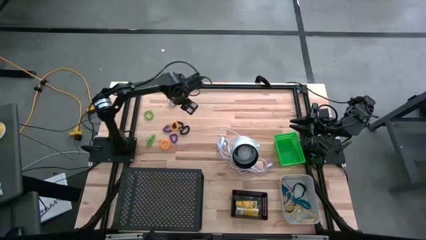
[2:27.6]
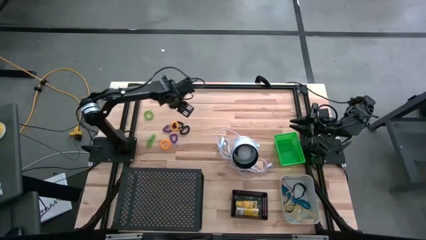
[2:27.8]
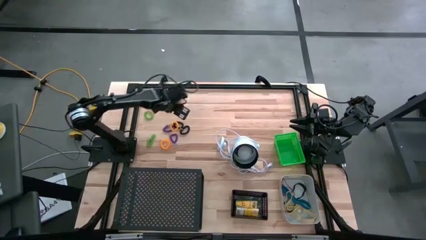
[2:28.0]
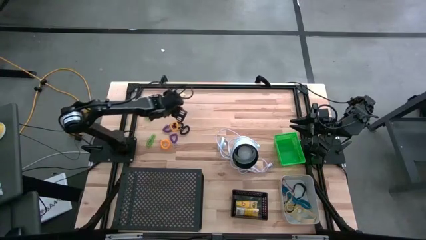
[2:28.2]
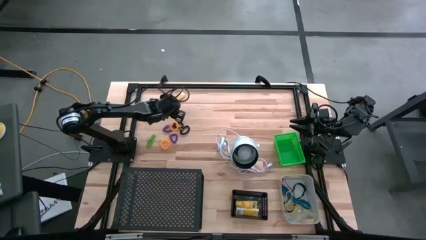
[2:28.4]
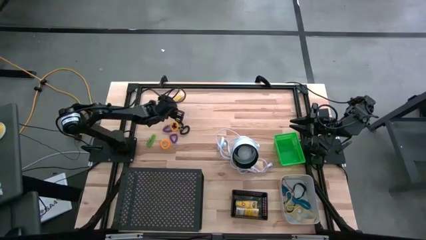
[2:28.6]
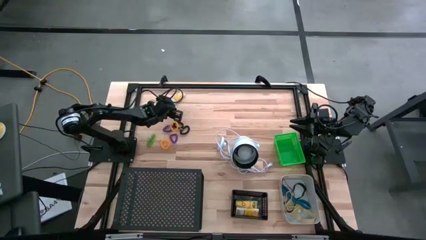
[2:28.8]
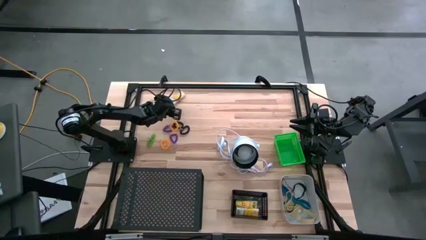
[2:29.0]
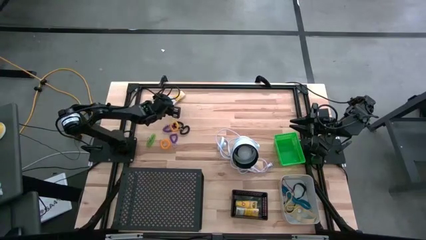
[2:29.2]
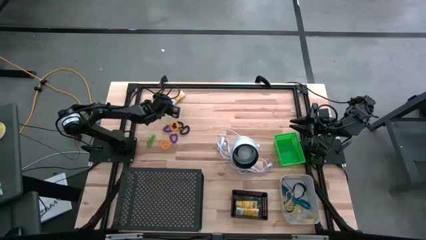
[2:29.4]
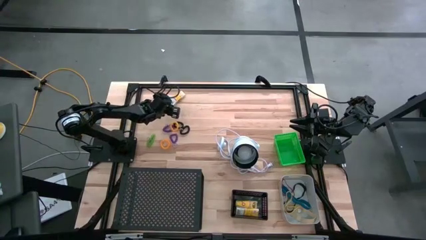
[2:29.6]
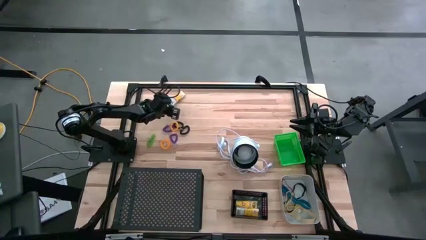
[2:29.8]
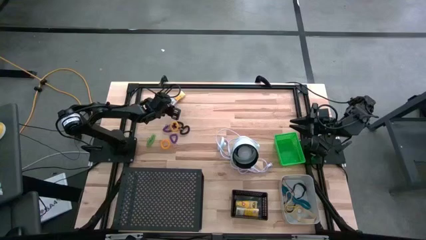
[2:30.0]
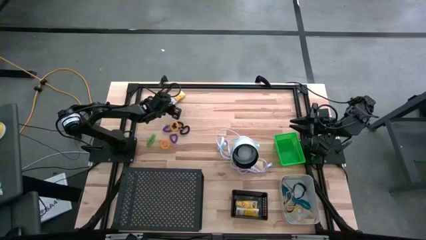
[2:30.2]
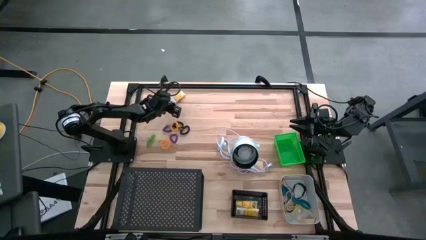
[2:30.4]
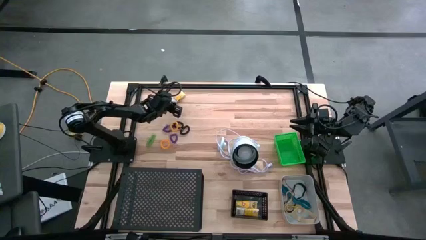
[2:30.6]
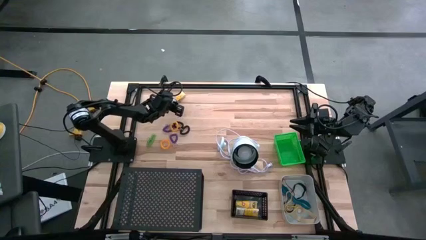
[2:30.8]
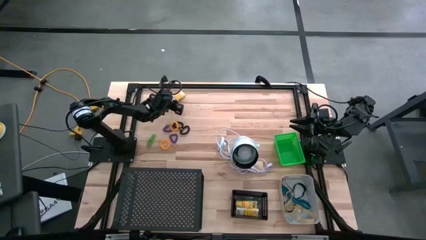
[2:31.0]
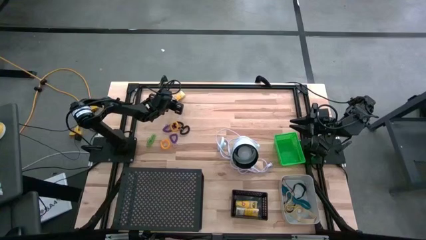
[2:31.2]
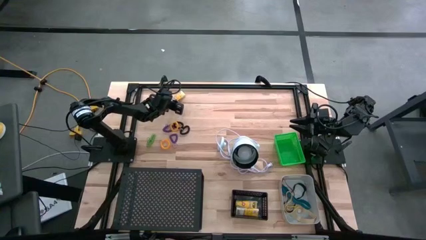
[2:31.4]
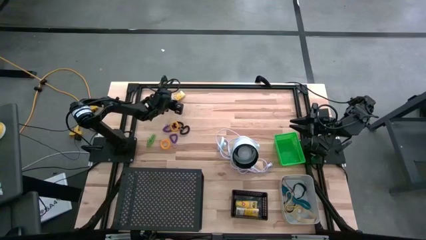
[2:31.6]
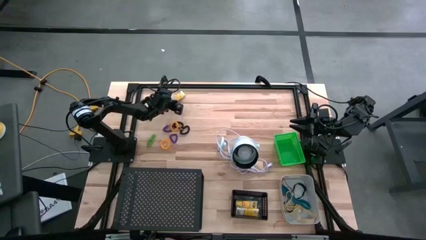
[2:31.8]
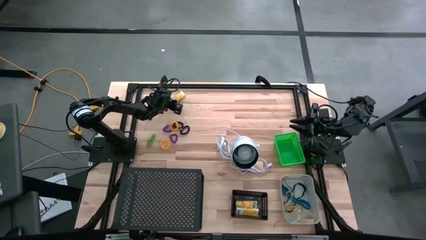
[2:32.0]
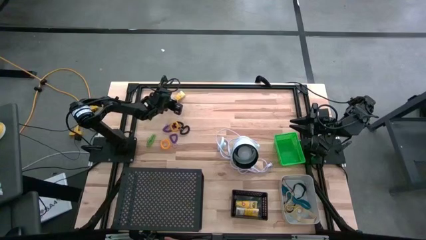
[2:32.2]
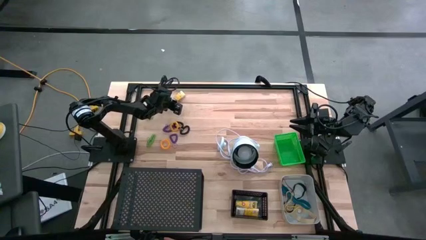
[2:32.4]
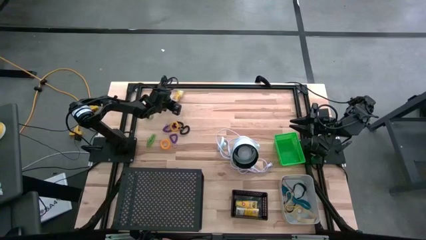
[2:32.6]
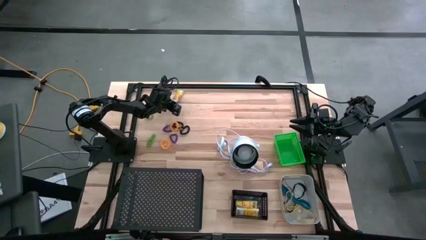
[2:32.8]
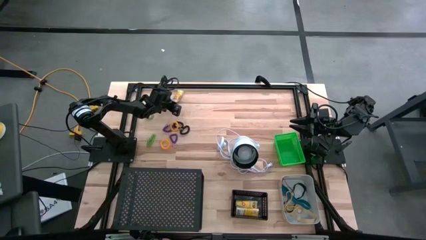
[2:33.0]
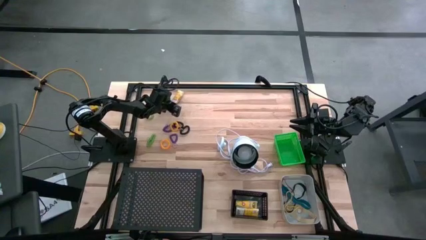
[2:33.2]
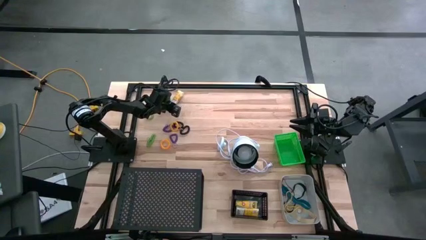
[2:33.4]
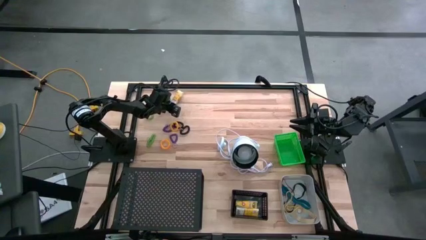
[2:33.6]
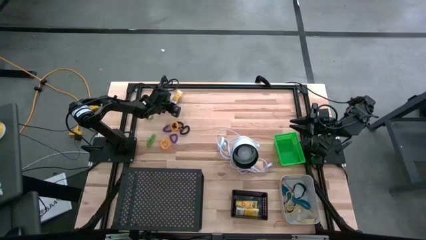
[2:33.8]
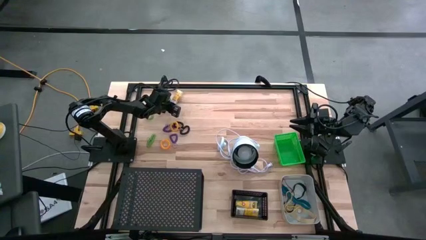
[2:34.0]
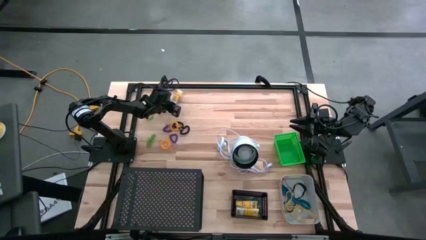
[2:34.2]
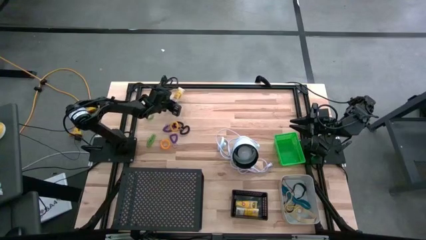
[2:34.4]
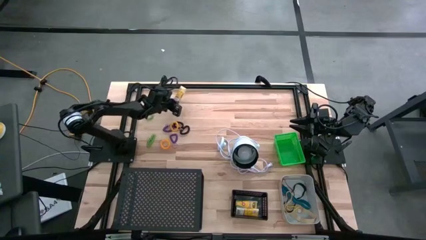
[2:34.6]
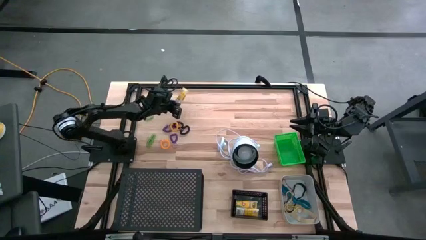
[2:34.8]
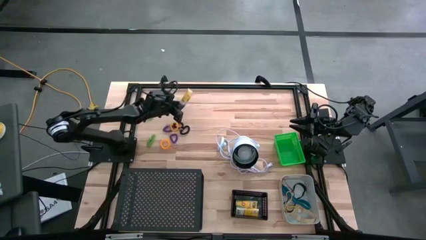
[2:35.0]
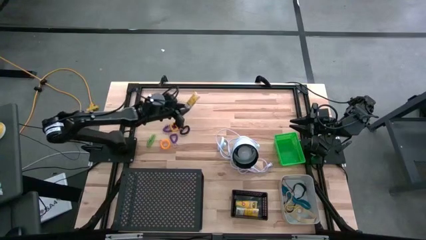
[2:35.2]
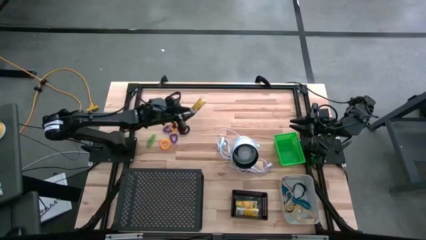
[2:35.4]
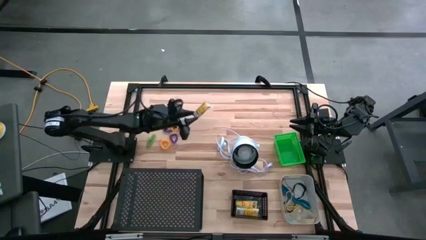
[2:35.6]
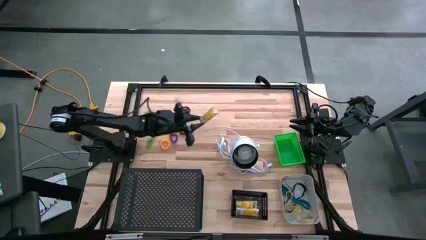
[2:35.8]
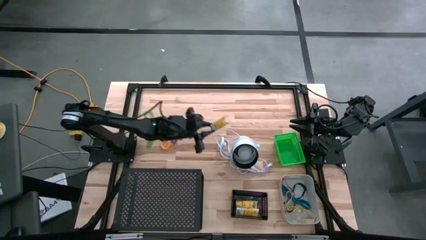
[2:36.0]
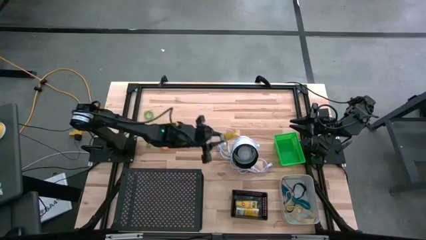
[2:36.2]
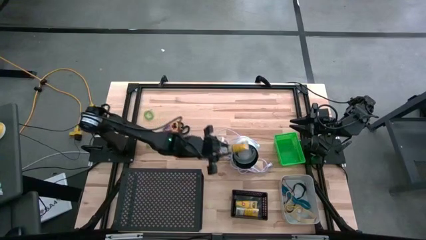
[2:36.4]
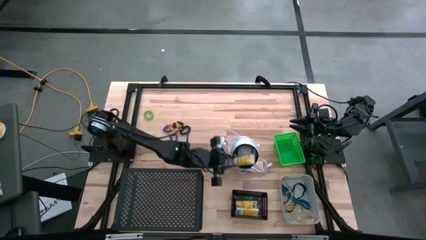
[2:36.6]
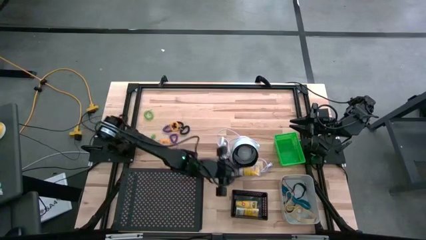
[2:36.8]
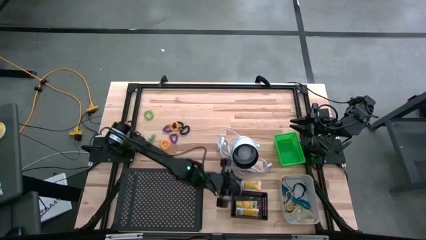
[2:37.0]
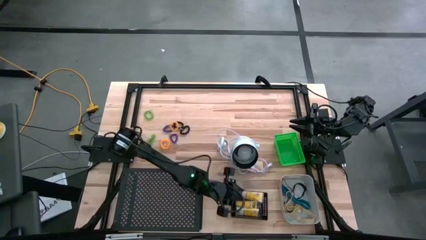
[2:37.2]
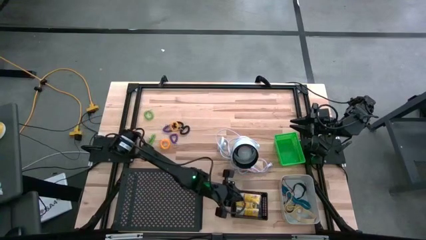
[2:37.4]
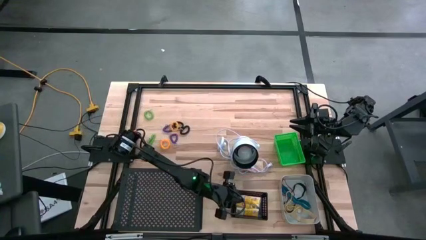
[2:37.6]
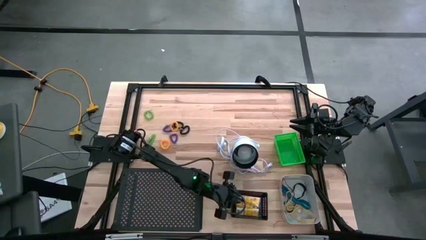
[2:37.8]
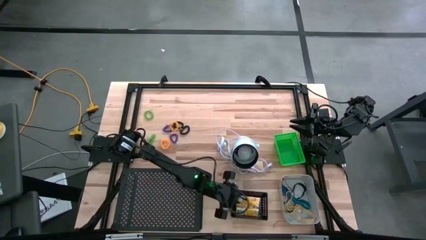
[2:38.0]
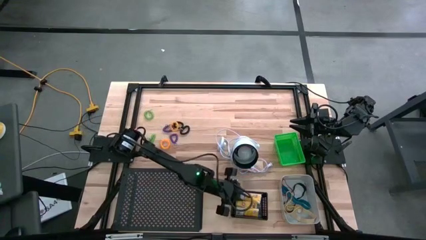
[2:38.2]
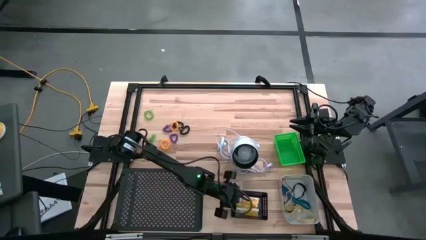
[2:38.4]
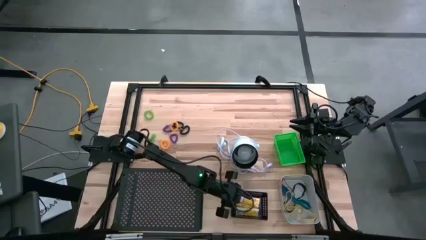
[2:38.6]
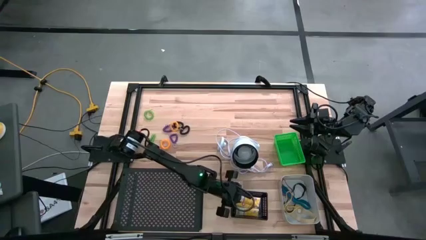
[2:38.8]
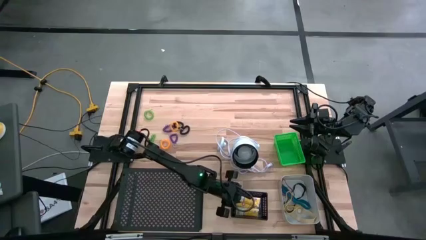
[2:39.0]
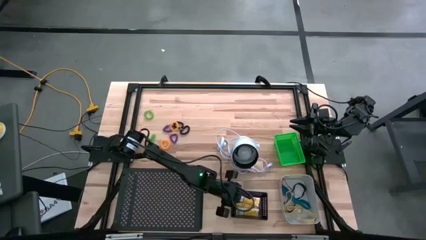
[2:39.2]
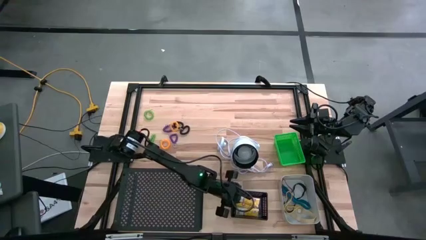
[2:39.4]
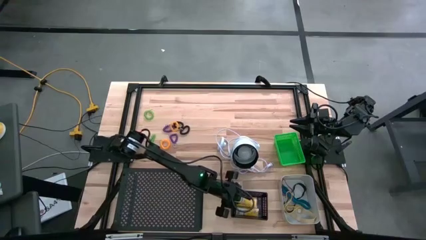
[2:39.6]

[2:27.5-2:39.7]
Task: Pick & Place Office Desk Supplies
Put the yellow crayon box into the black bin

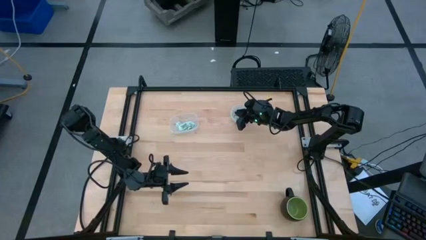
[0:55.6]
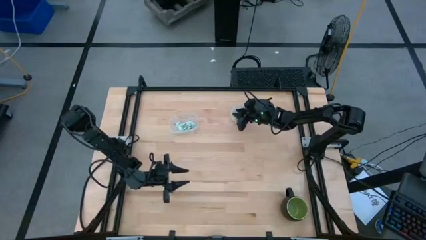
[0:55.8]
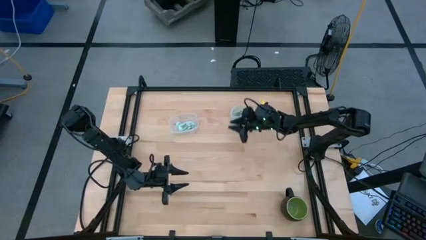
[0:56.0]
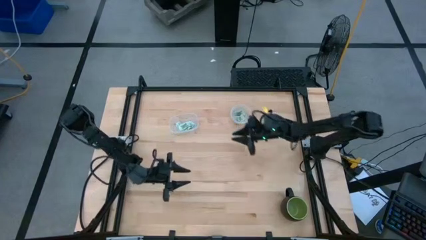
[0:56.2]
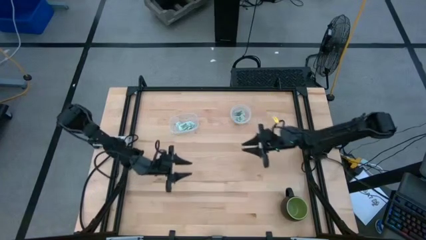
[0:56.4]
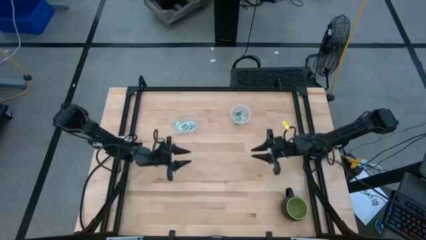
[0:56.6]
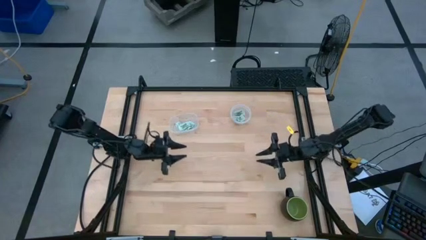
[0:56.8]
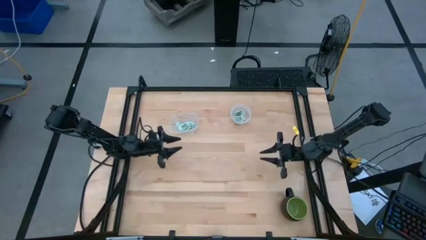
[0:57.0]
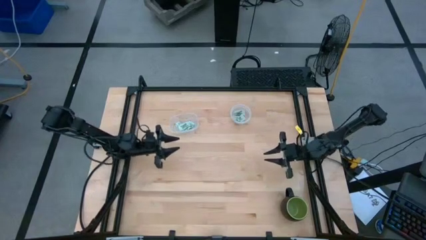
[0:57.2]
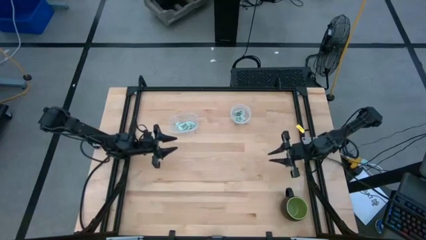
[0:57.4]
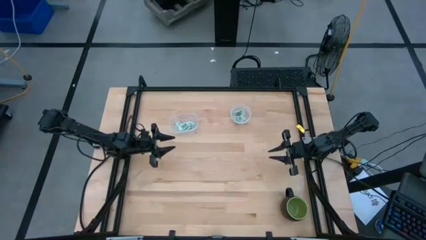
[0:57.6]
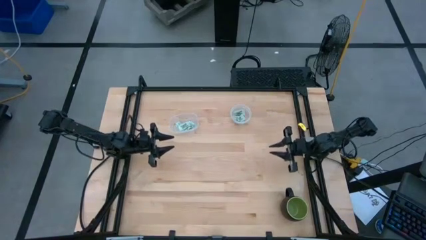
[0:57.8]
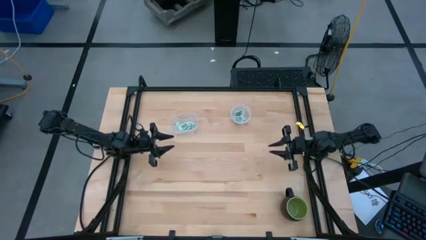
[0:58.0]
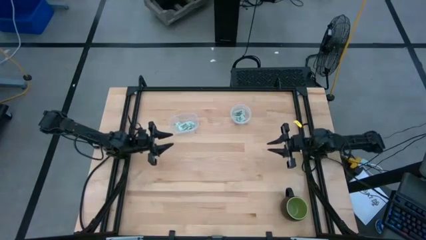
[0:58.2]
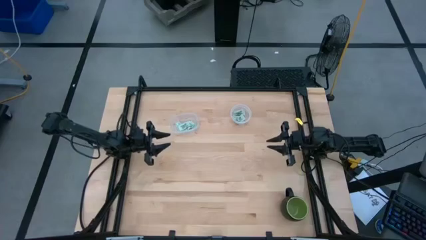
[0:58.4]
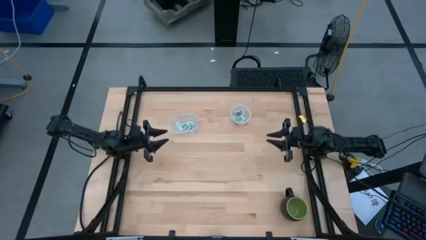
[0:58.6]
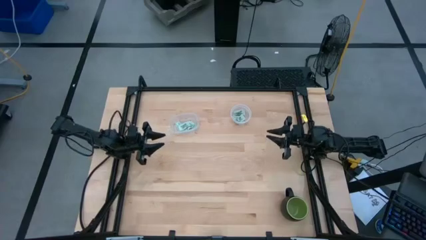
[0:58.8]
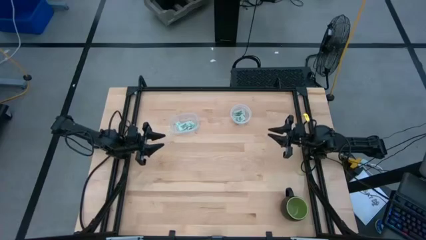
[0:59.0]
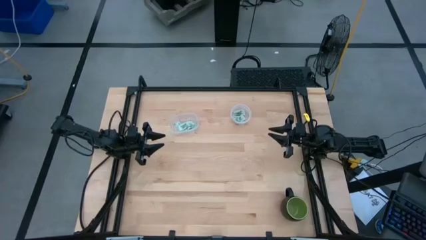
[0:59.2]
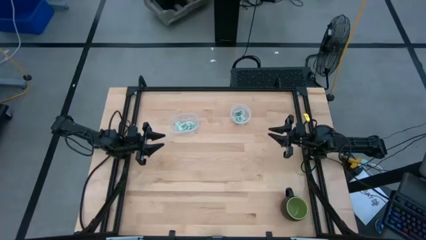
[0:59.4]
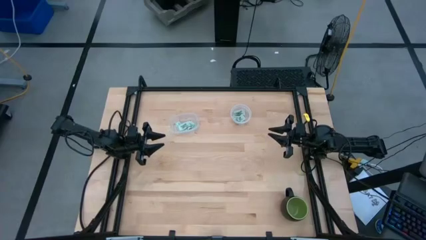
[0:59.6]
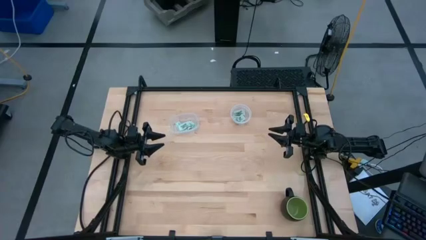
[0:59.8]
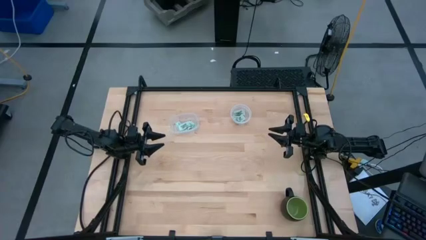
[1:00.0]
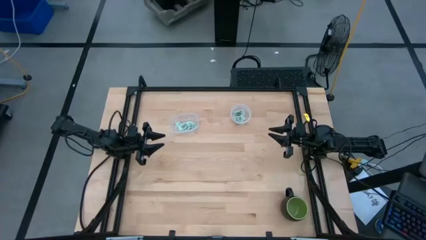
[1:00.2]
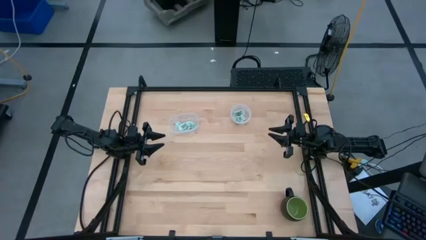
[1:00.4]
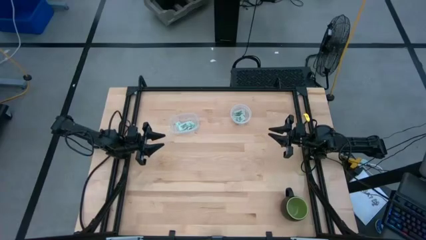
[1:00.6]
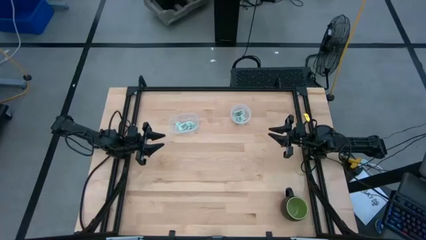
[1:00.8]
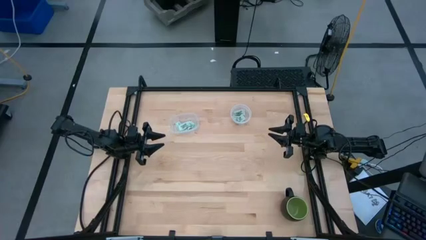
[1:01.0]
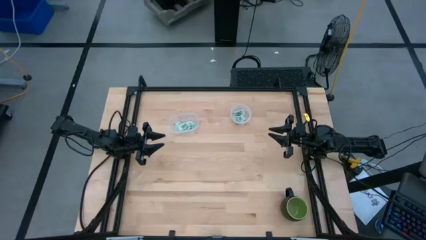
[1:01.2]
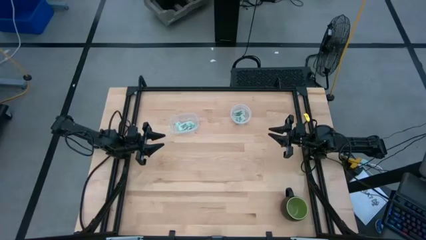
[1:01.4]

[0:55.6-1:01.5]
Task: Pick and place Stevia / Truvia into bins
Return to Home Position
